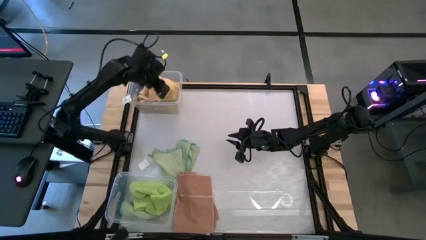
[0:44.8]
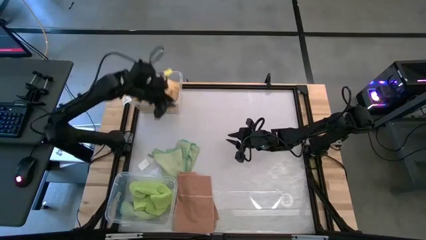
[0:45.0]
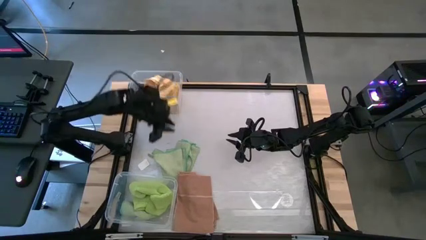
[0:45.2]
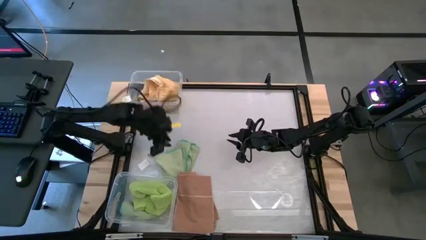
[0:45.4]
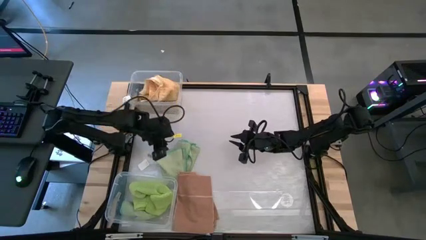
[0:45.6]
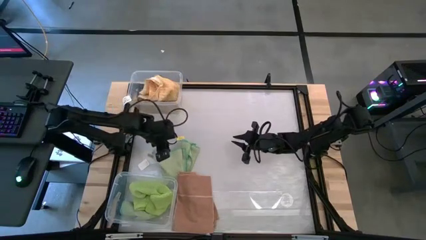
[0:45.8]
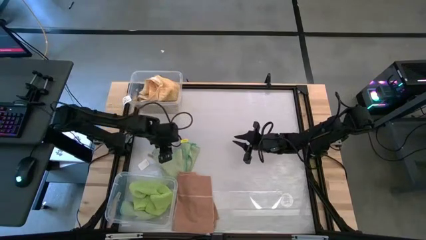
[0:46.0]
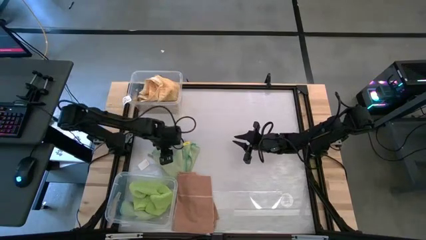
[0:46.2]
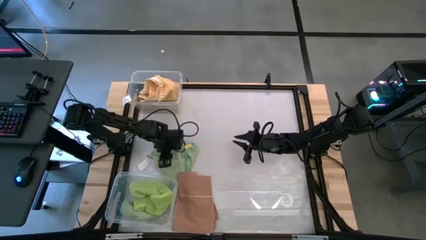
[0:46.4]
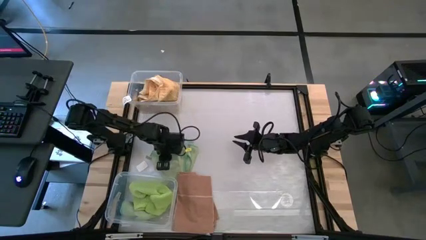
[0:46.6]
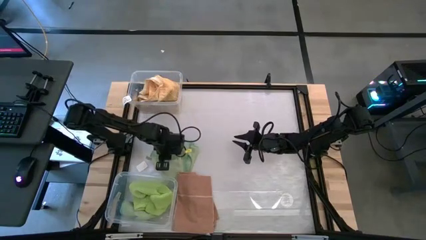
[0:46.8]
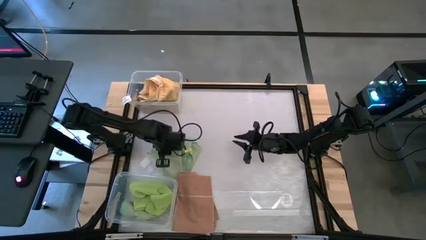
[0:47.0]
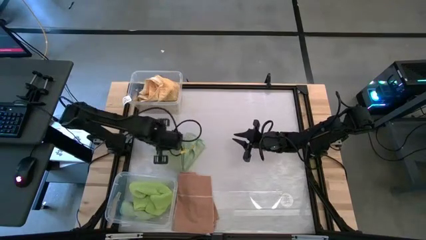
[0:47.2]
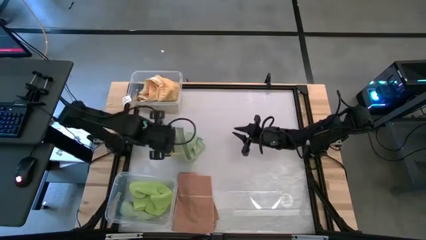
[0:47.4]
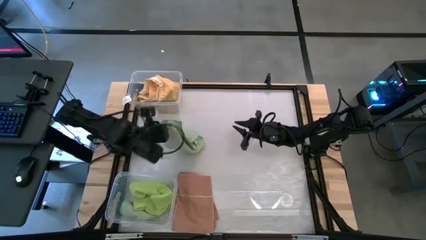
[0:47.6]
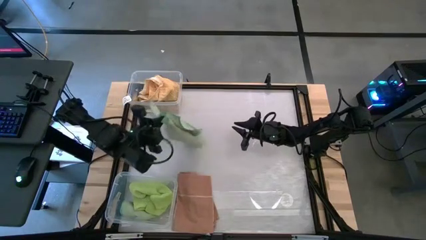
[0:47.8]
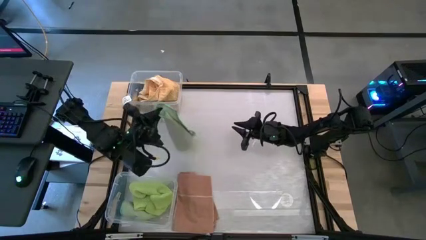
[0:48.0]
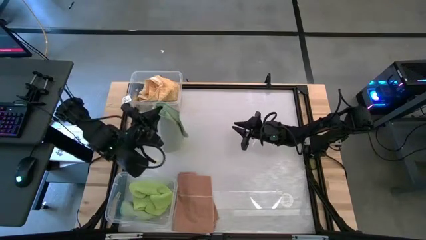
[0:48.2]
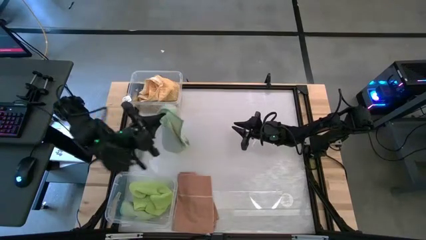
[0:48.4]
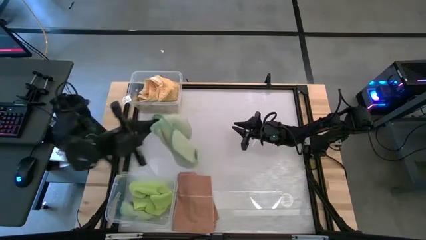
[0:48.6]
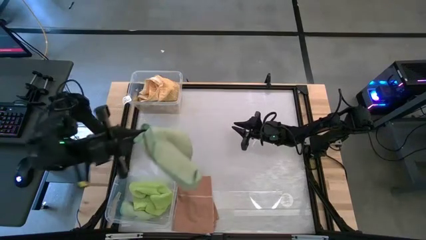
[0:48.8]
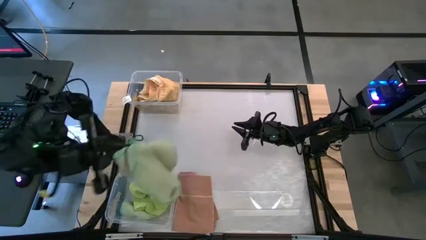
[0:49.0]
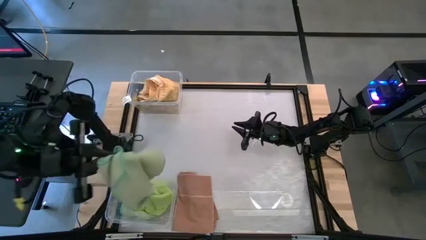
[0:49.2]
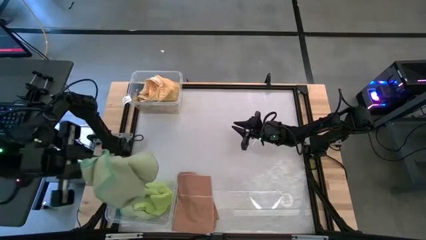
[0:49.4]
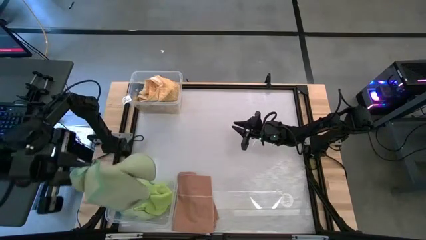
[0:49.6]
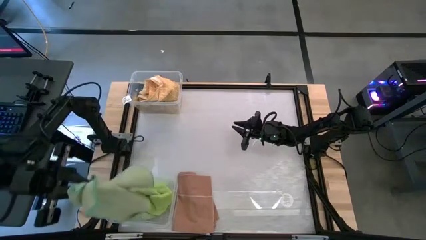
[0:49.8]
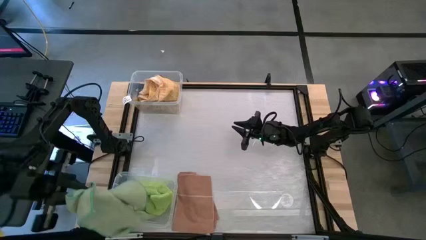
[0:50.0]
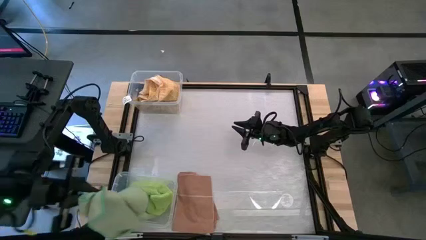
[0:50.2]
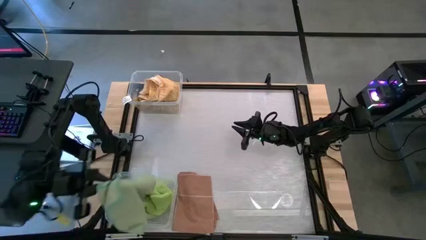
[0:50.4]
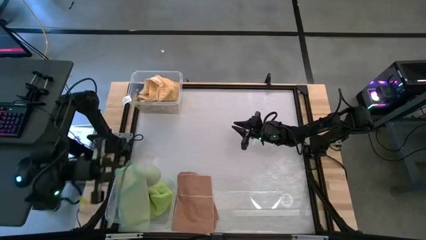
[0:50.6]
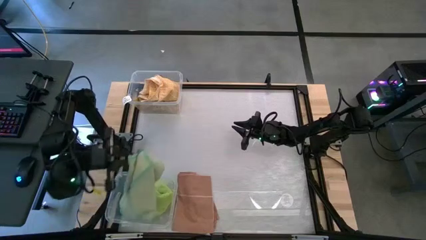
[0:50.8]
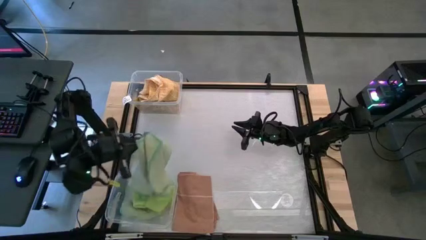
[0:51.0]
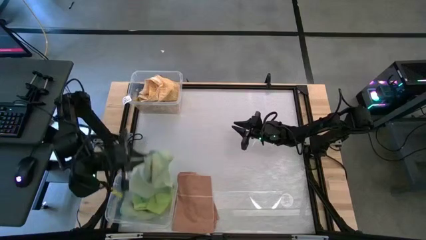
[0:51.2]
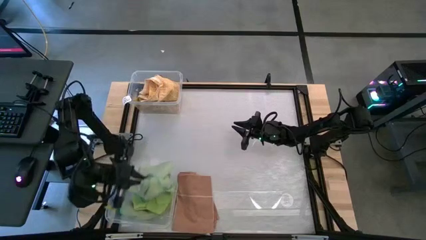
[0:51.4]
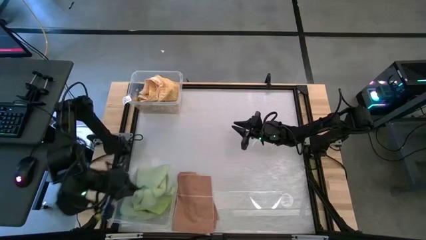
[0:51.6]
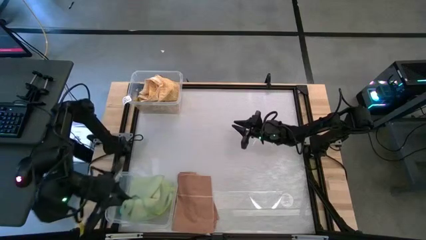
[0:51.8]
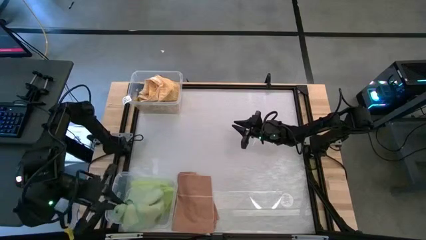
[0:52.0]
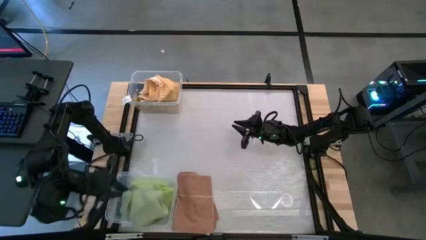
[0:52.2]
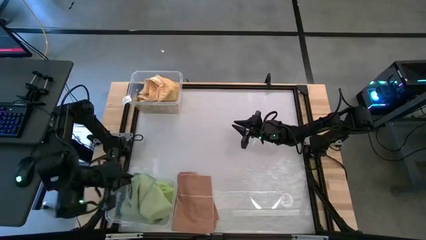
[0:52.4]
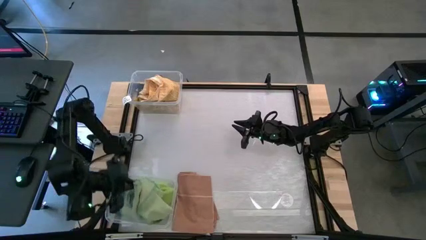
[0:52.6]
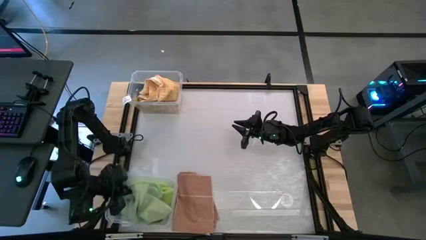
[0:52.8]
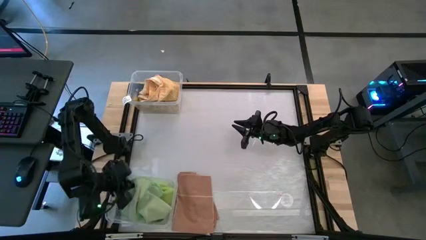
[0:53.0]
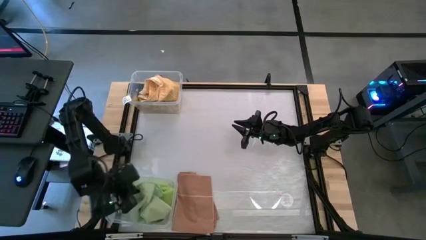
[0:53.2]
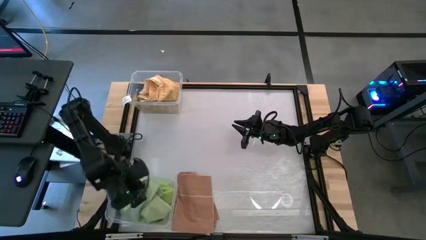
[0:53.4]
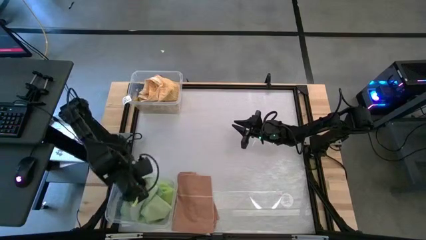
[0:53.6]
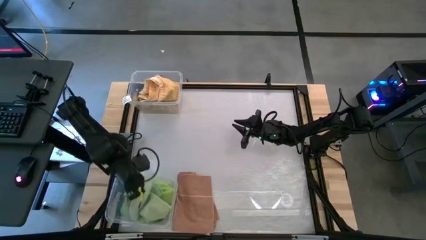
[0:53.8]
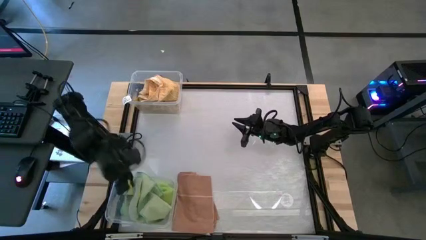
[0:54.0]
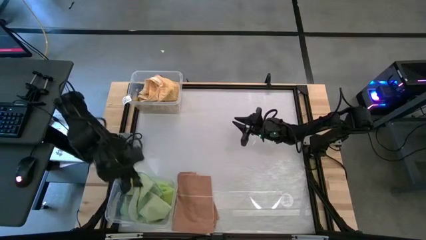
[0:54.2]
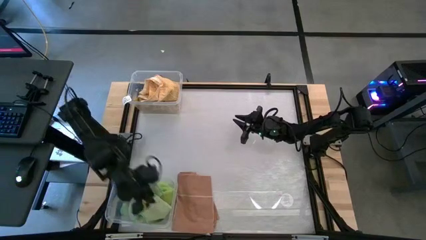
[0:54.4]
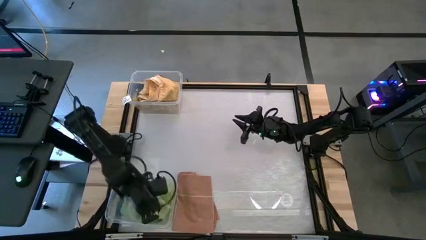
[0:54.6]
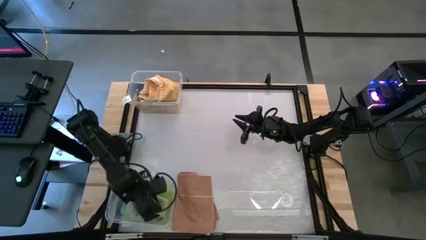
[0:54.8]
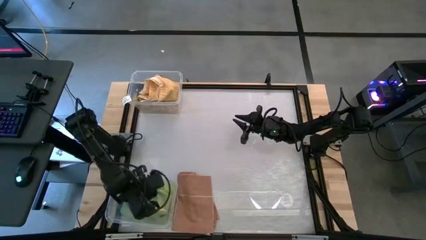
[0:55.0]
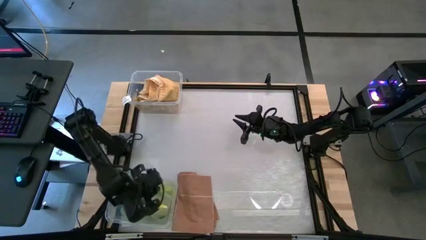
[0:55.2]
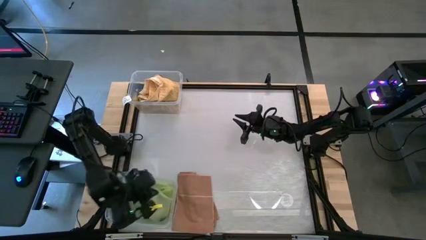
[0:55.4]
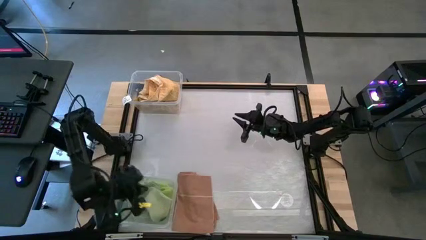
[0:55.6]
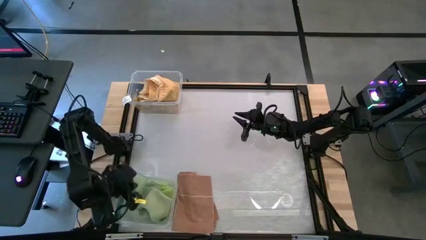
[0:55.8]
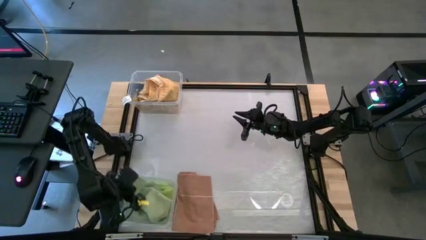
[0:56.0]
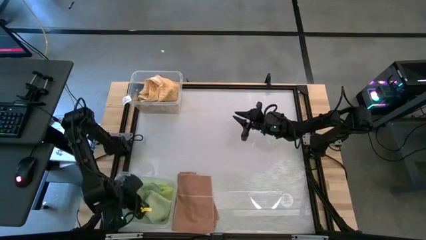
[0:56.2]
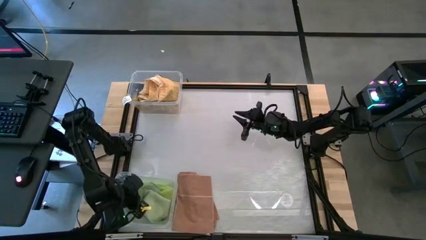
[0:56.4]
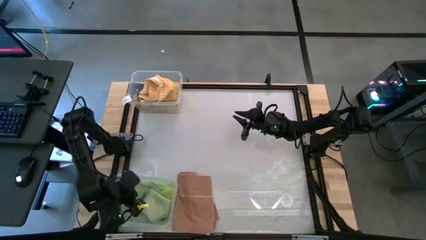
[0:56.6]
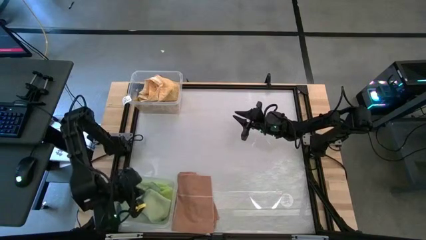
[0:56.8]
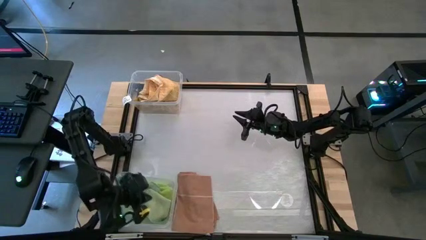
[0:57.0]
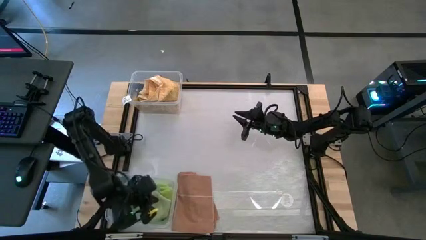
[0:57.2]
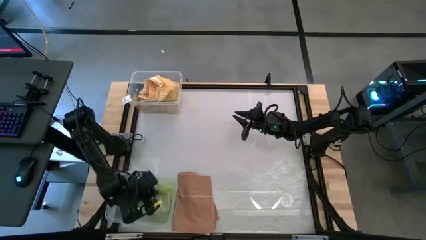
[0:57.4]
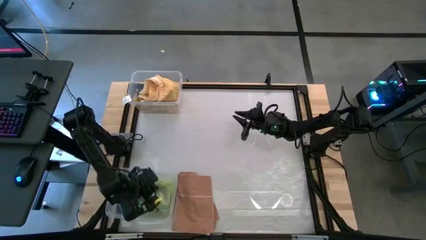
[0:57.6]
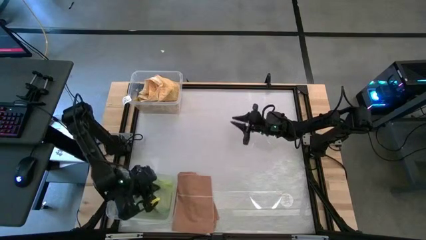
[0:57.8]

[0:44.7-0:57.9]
Task: Sort towels by color in basket
Put the green towel into the bottom transparent bin

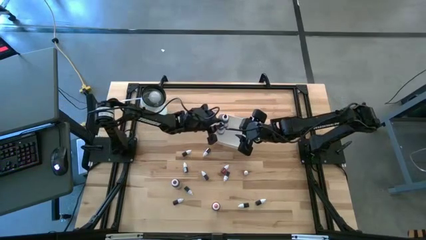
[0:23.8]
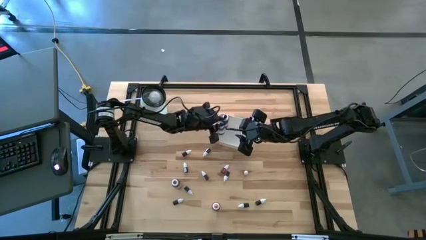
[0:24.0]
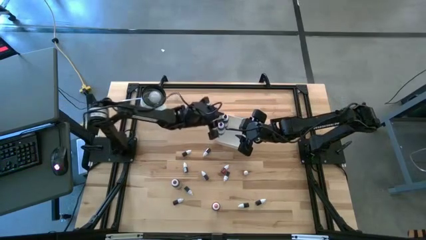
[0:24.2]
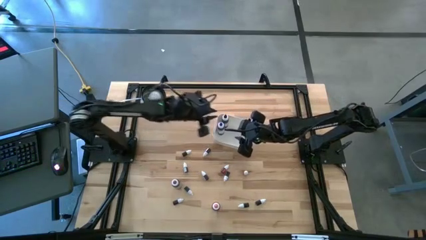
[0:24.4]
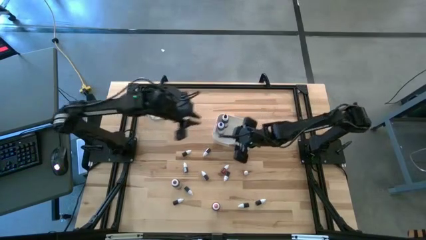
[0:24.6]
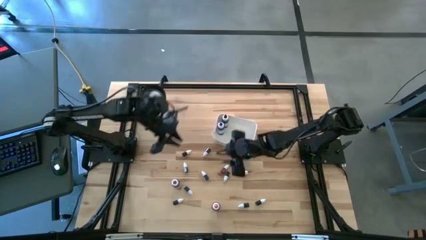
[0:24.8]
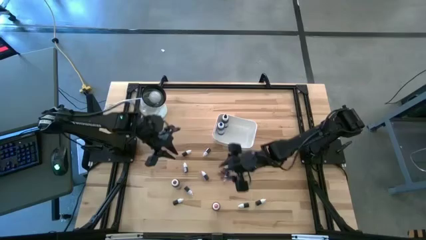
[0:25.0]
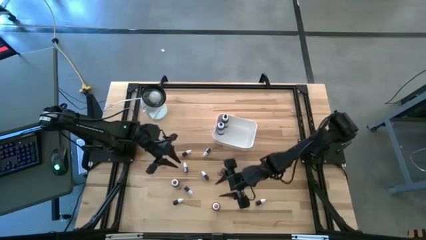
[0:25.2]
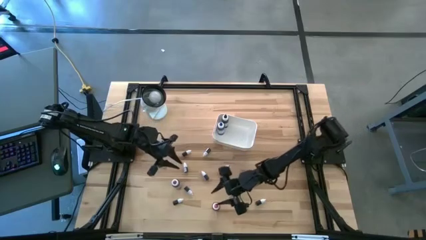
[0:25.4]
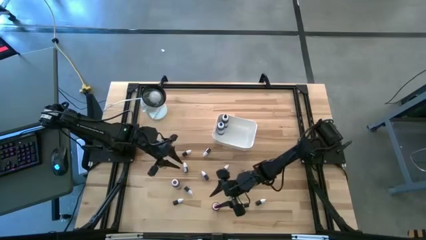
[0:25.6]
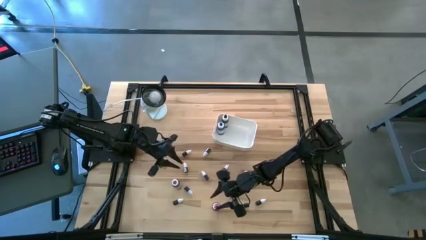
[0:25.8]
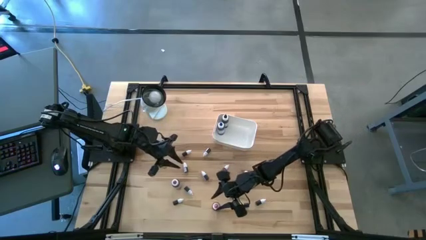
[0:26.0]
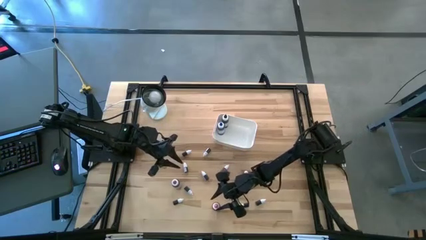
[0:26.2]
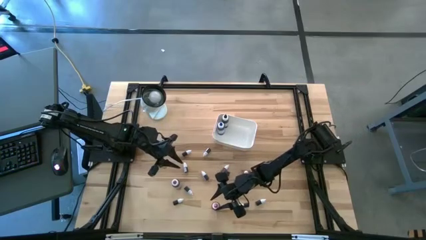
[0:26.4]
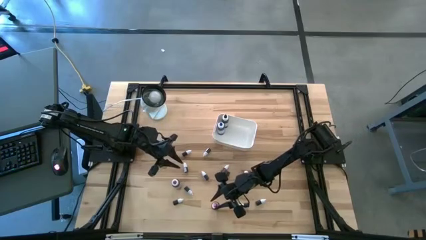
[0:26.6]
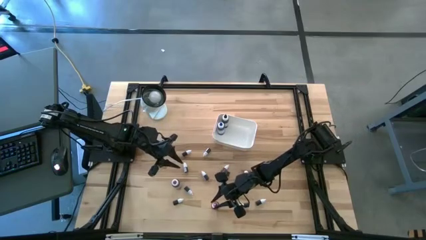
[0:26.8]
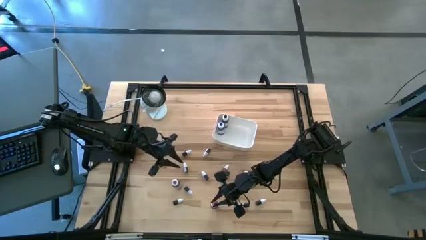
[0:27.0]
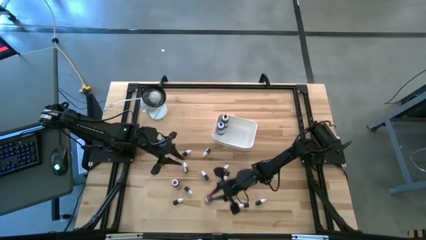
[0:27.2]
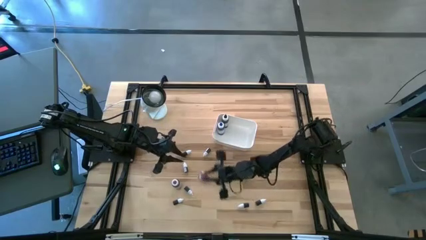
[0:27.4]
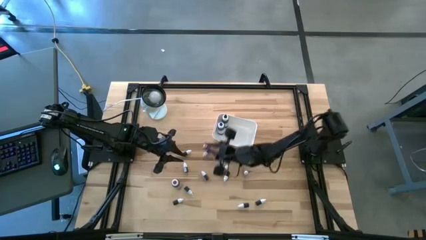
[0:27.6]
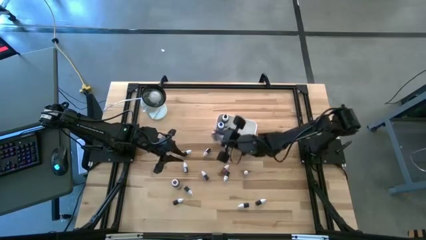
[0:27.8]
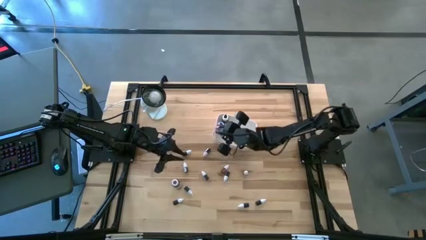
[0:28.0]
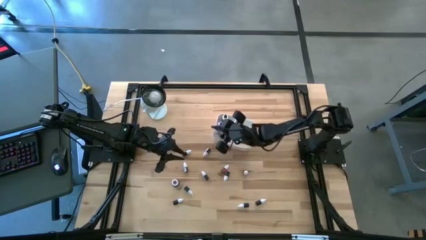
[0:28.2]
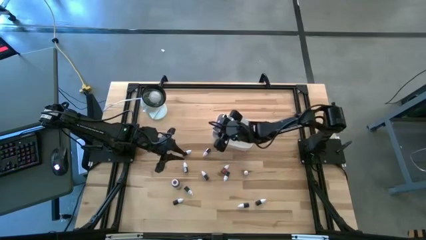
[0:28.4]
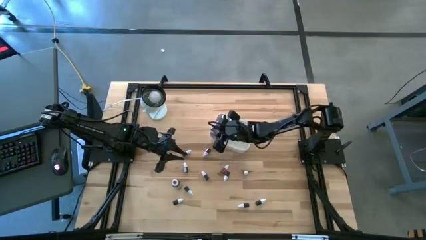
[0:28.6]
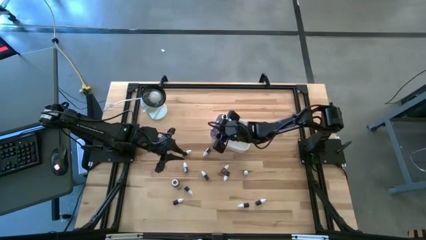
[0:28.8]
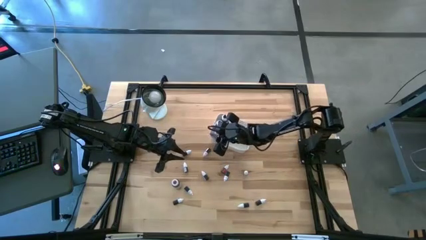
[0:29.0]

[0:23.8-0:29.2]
Task: Pick & Place food coloring
Put the big pink food coloring bottle into the white bin
